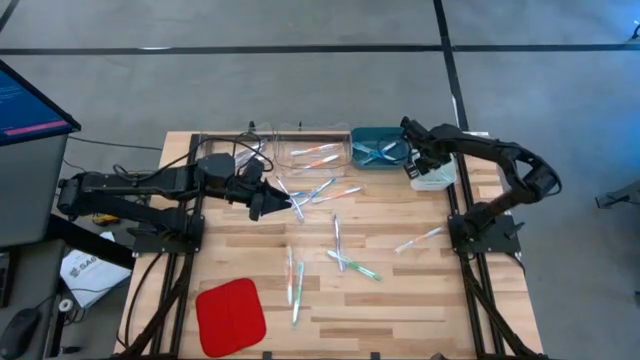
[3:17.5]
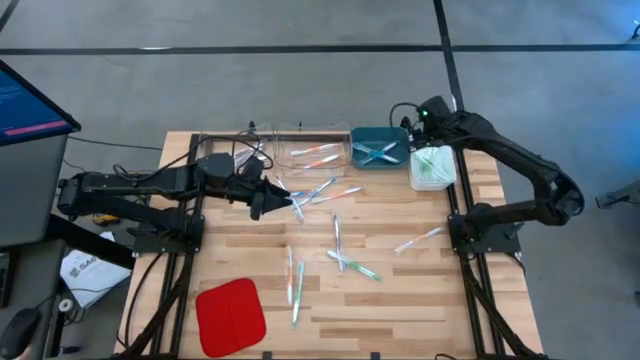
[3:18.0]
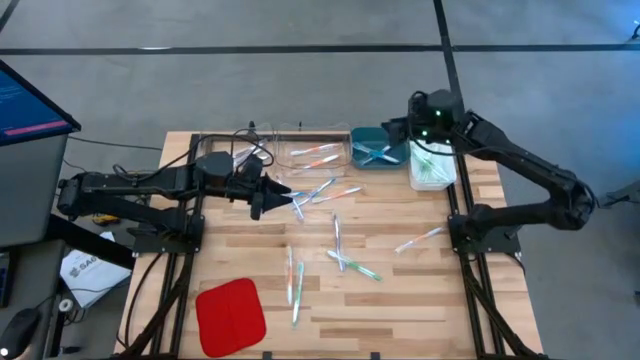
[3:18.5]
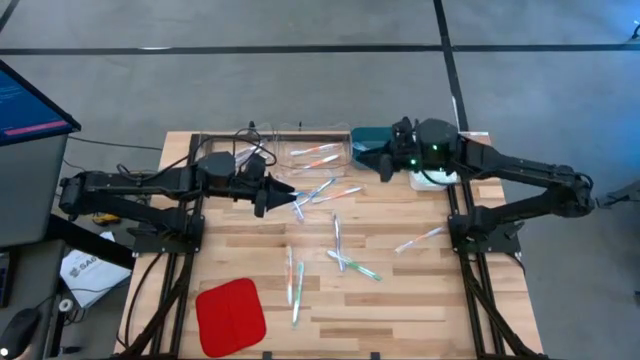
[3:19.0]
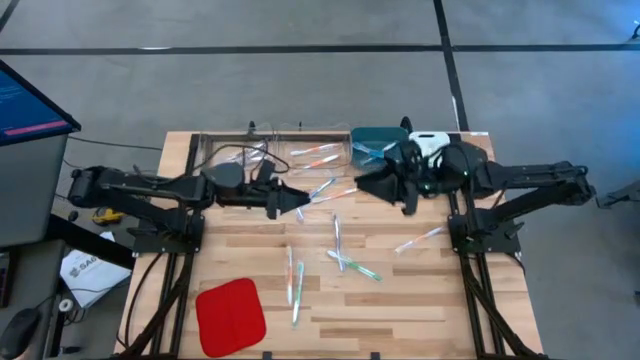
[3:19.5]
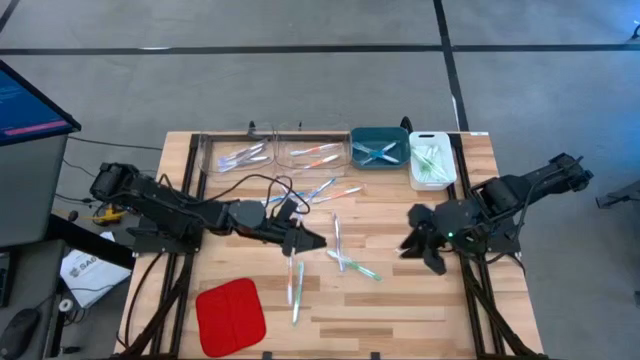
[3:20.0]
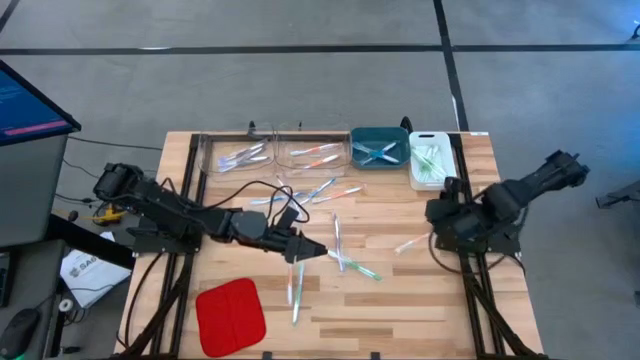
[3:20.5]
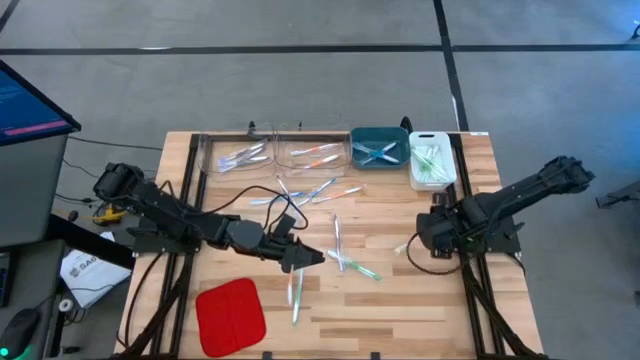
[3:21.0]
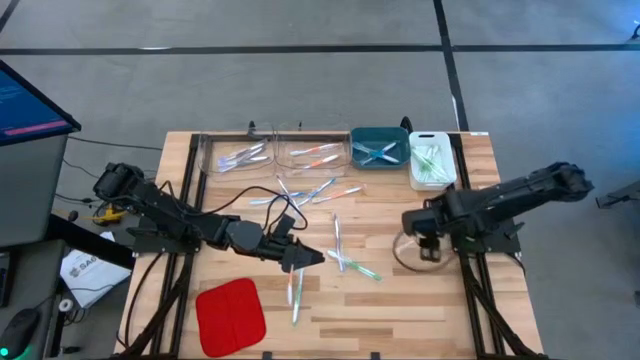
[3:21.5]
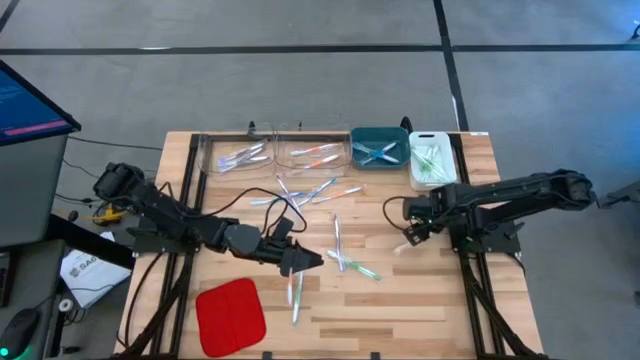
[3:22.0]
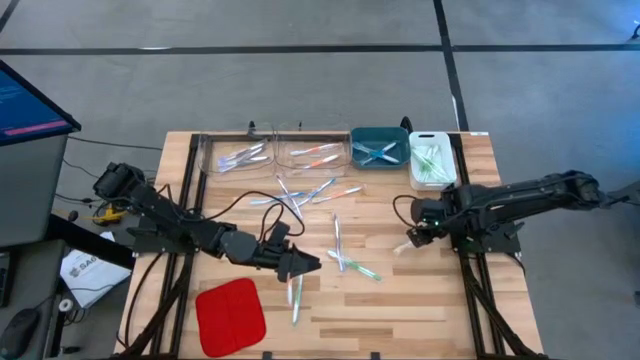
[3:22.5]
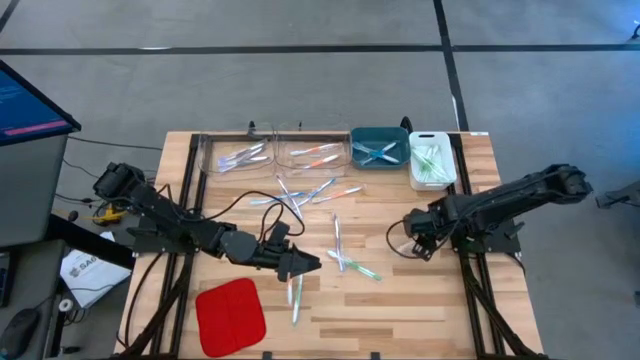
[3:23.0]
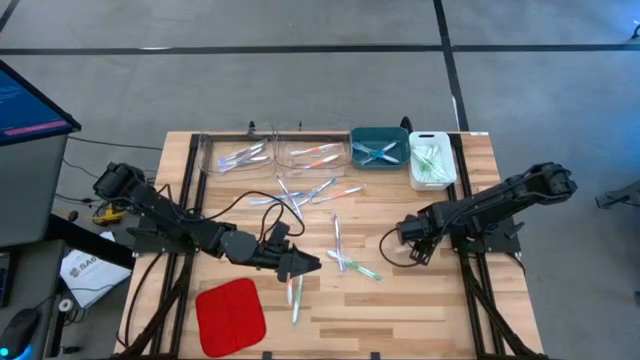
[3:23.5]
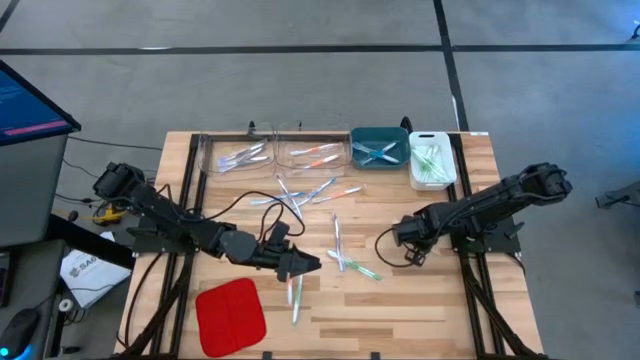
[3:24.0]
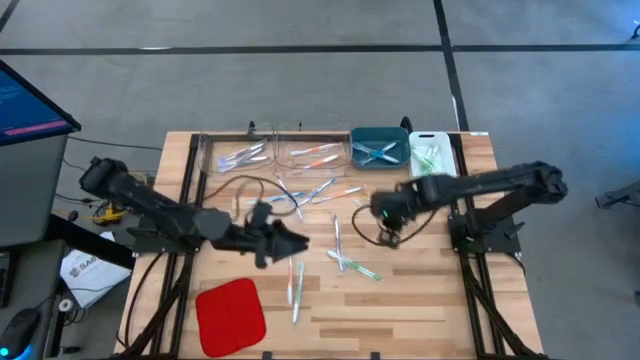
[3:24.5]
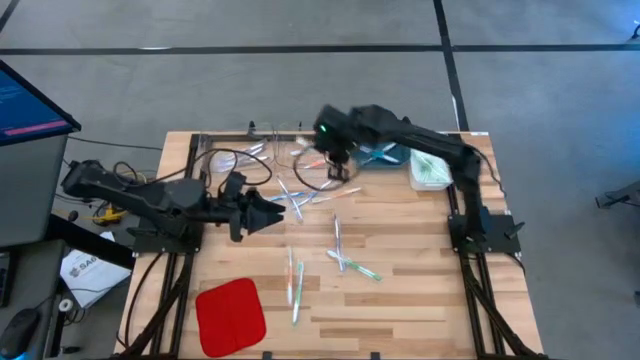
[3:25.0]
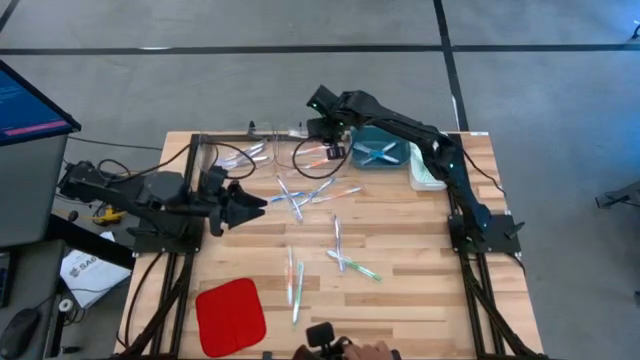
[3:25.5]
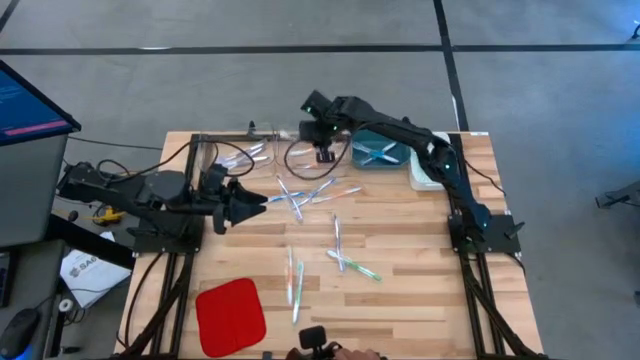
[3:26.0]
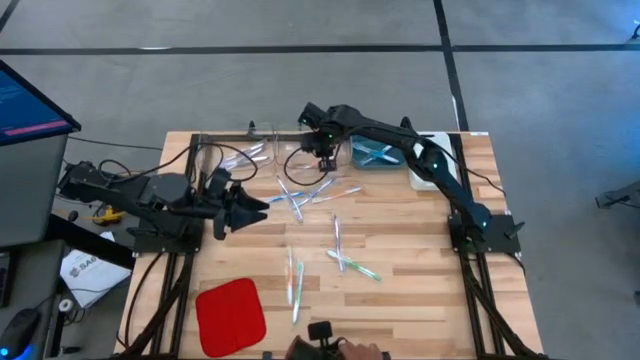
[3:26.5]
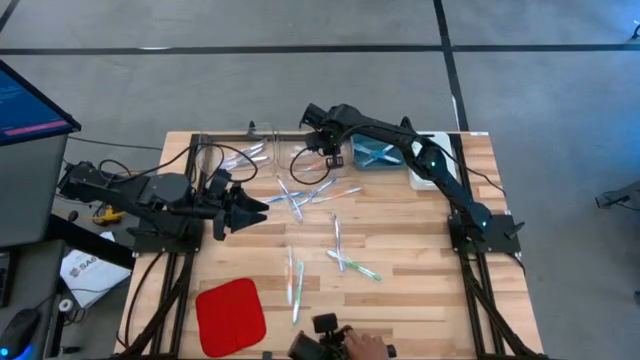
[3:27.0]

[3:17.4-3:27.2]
Task: Pick & Place Toothbrushes
Put the orange toothbrush into the right transparent bin

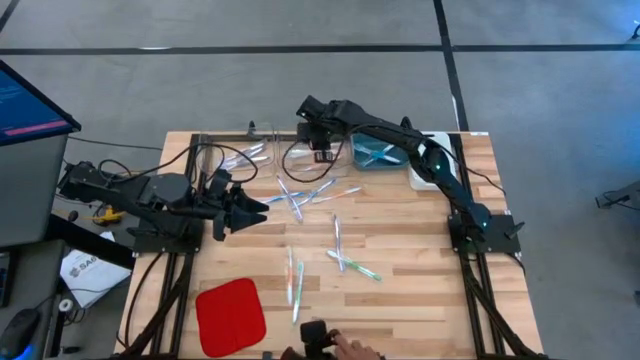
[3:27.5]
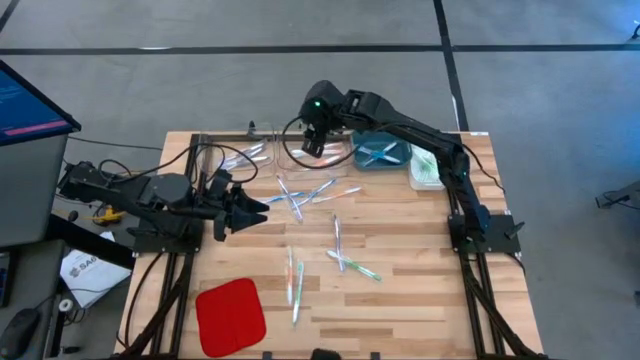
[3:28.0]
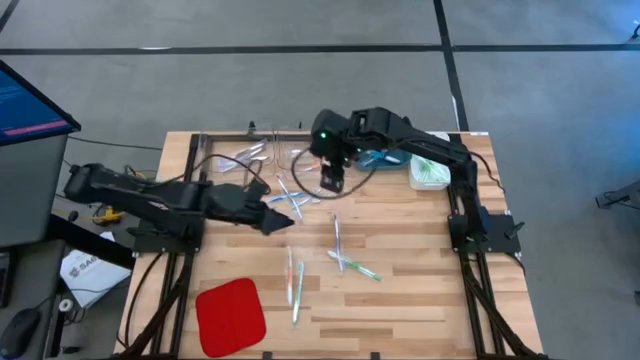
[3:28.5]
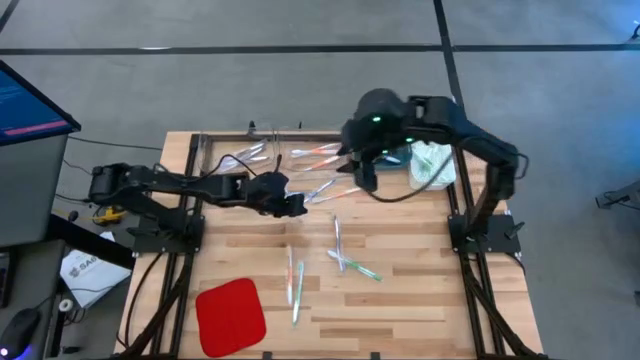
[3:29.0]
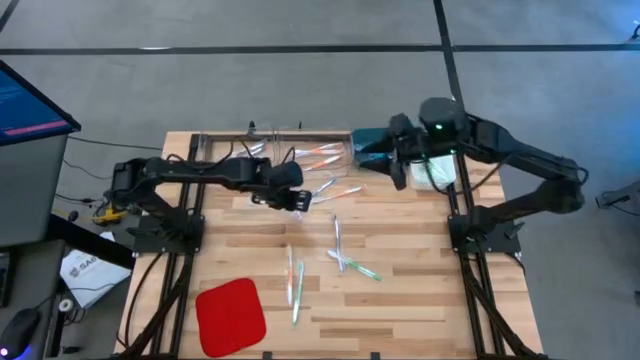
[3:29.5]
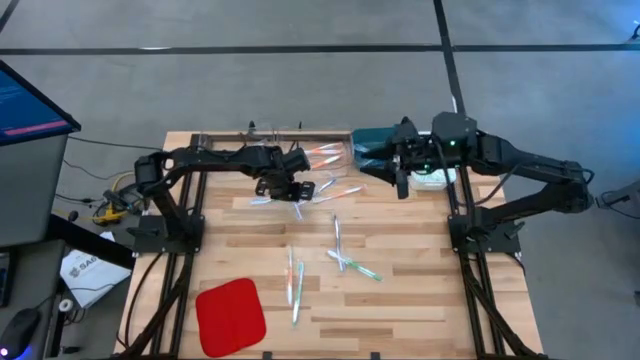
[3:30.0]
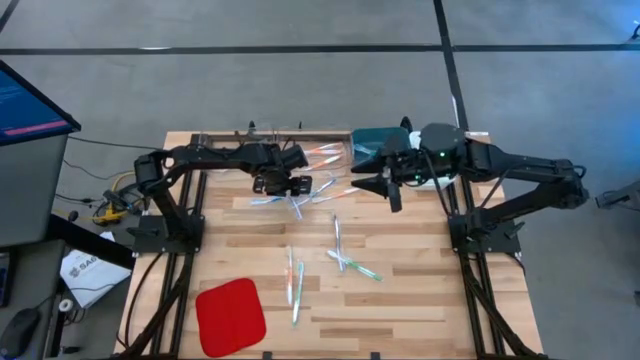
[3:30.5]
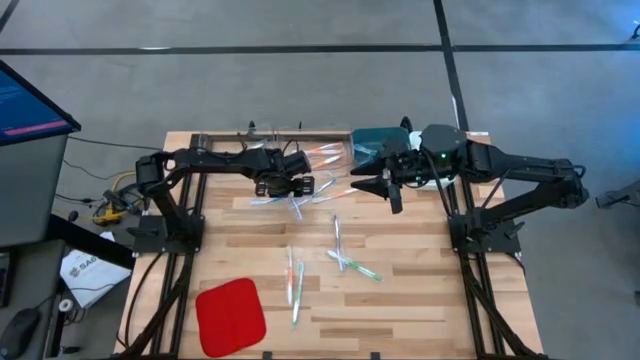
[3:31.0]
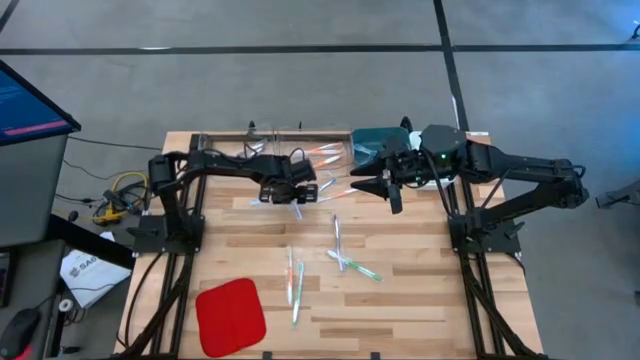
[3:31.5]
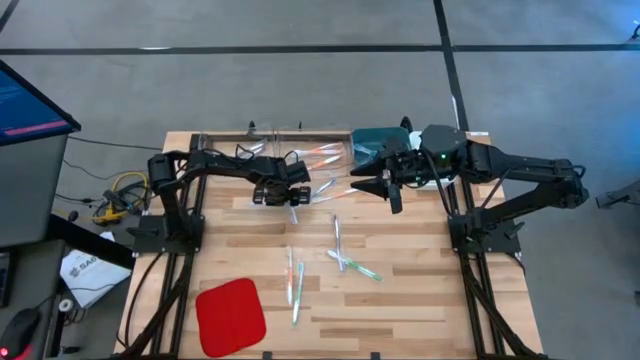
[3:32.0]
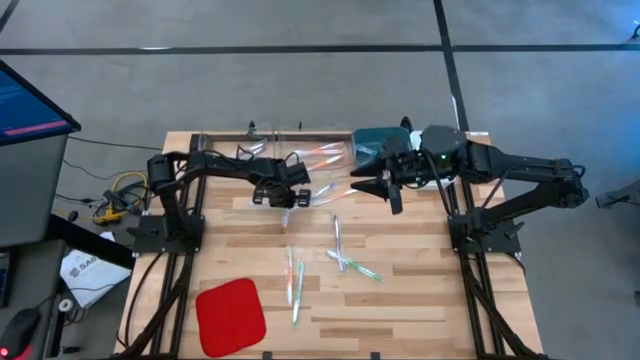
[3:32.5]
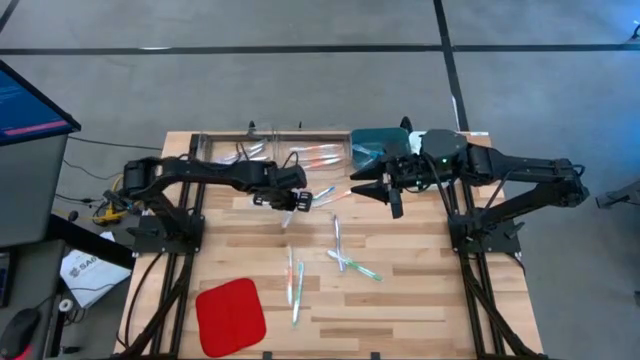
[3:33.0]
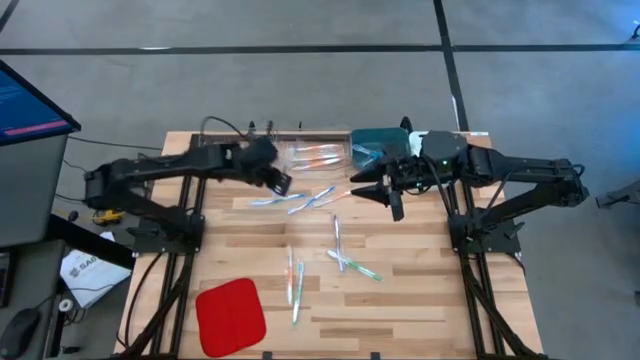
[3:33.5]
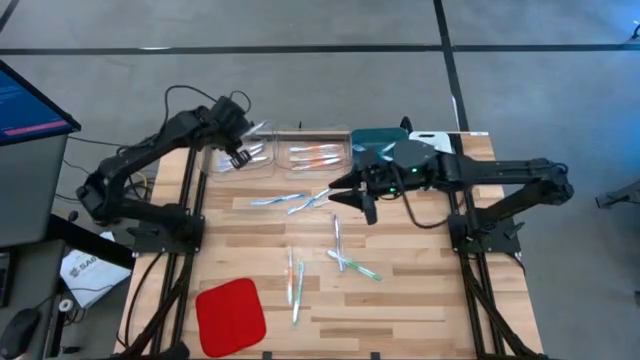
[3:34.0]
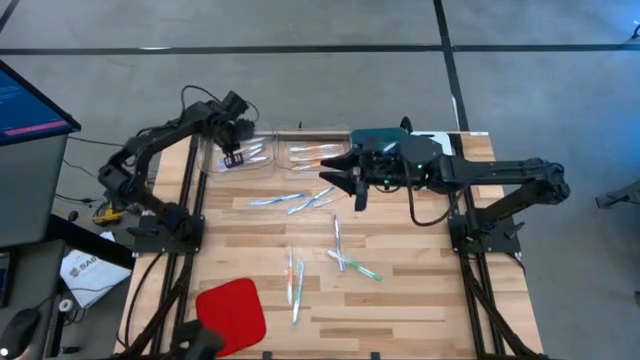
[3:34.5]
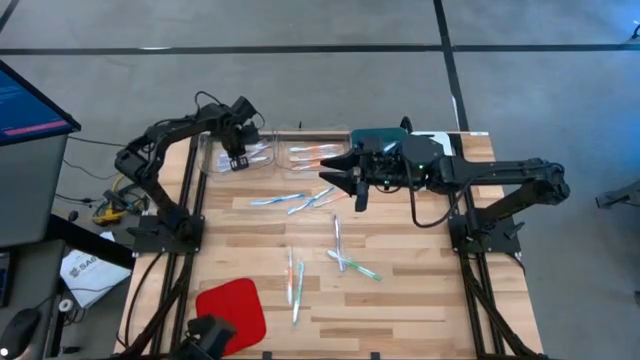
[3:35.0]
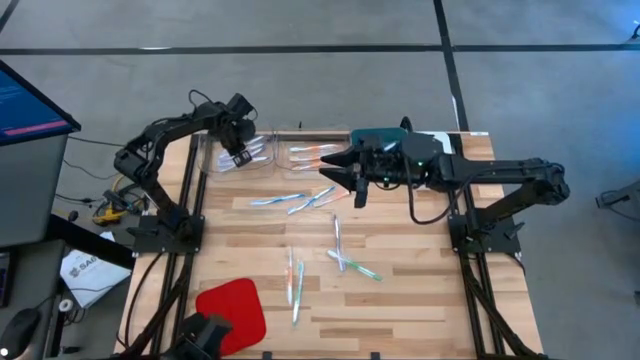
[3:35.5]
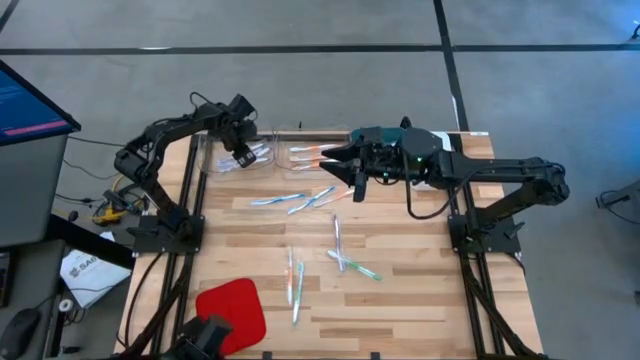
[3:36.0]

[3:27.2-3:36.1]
Put the violet toothbrush into the left transparent bin
